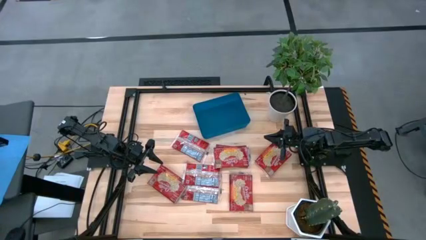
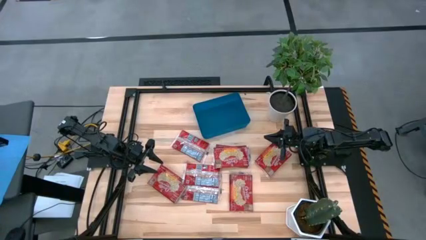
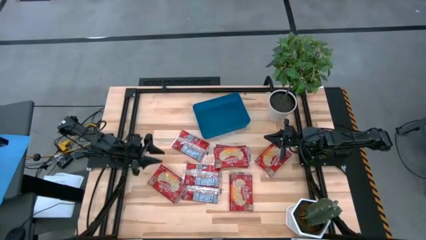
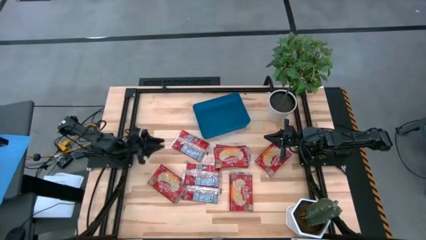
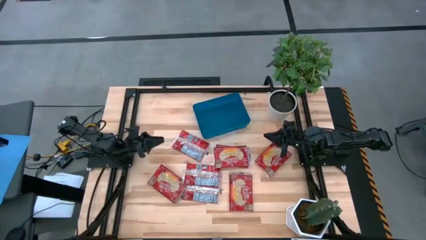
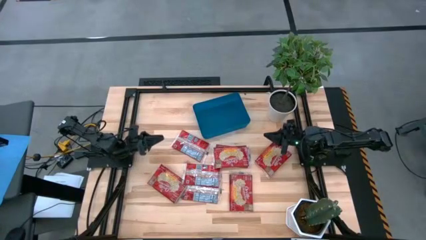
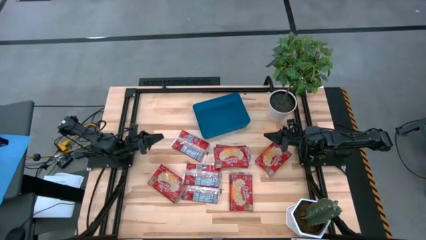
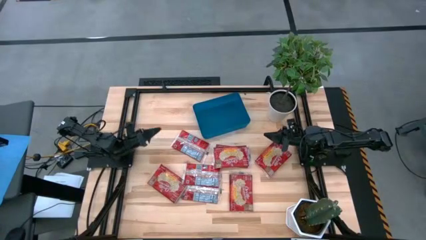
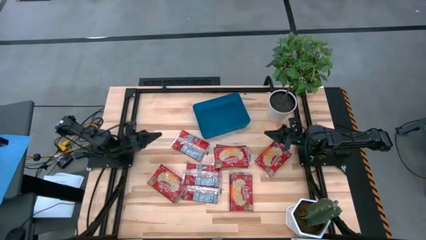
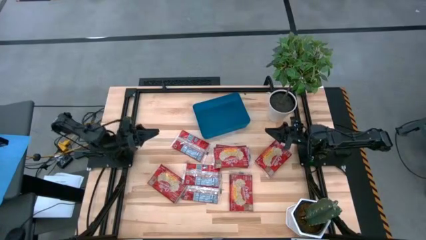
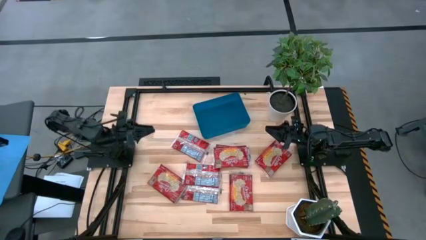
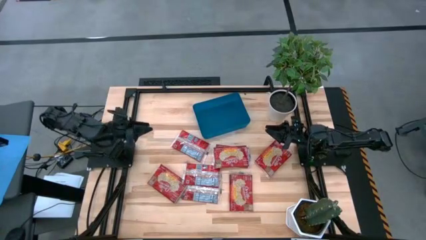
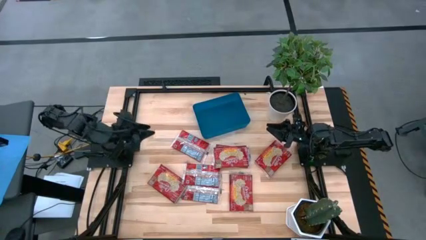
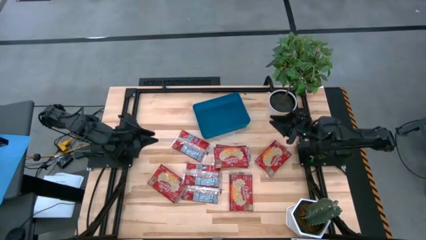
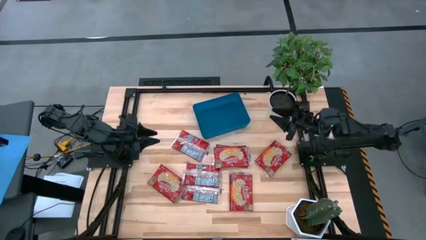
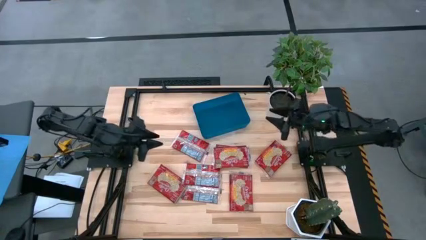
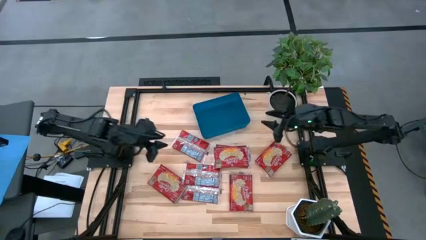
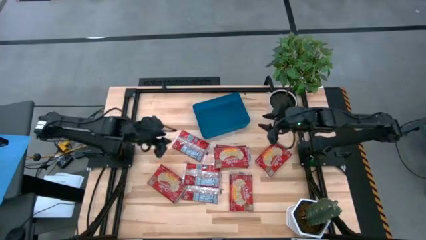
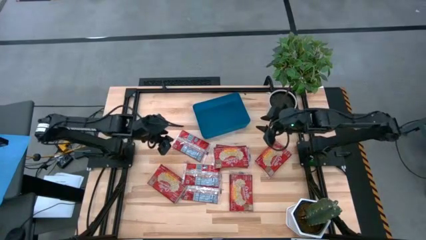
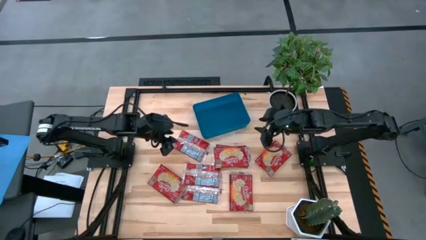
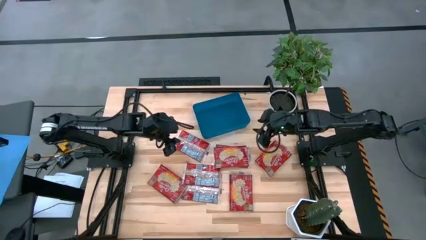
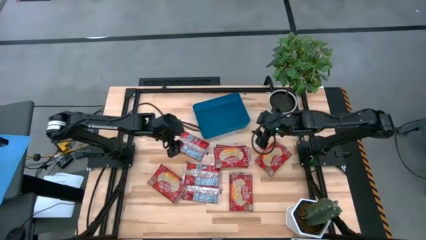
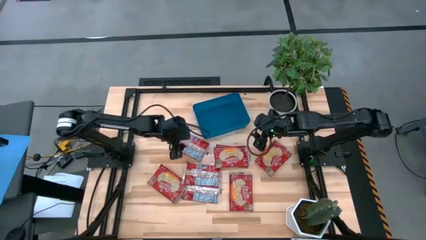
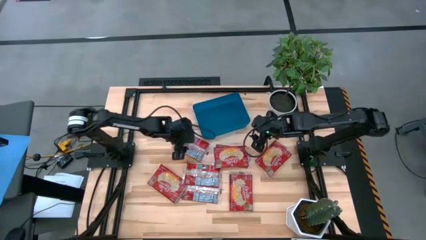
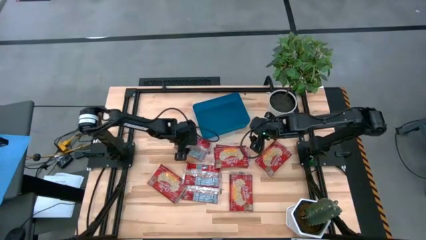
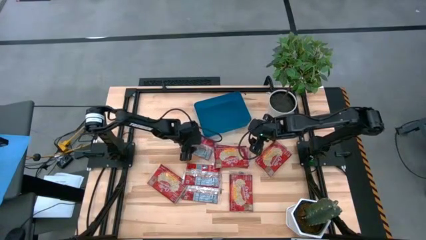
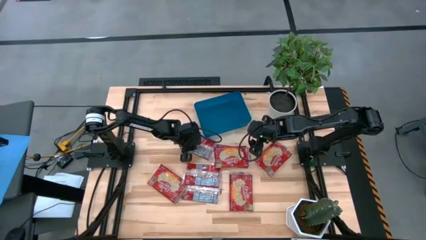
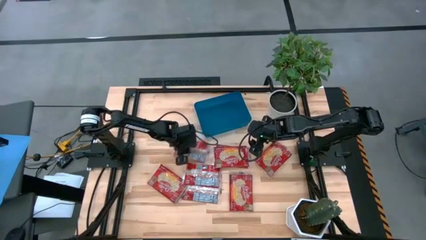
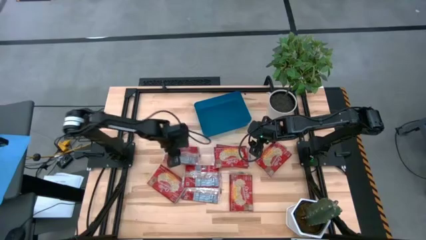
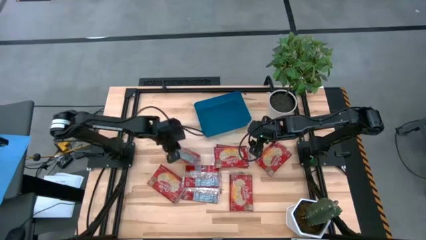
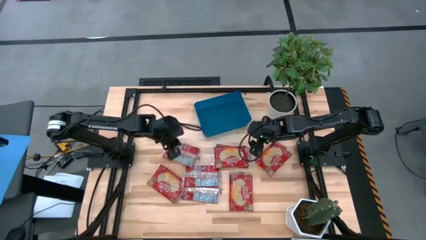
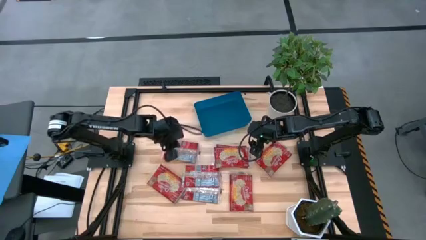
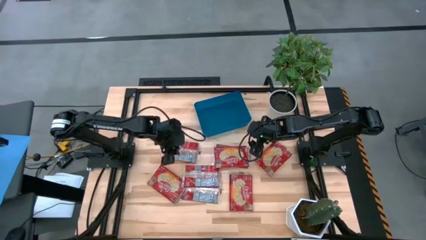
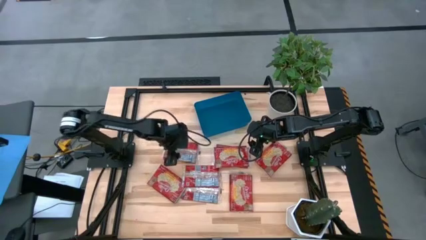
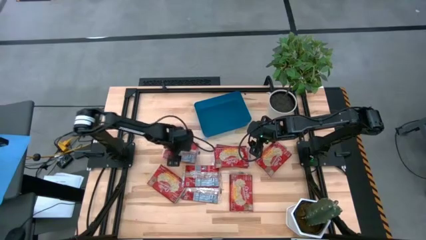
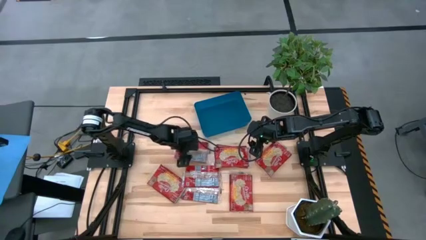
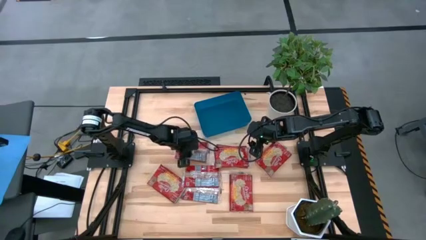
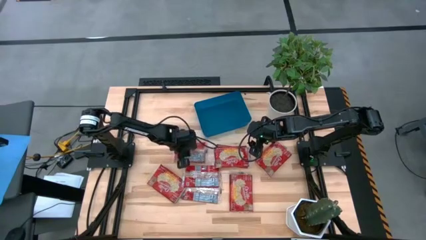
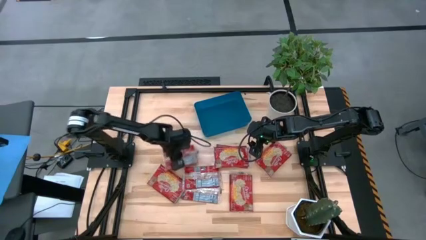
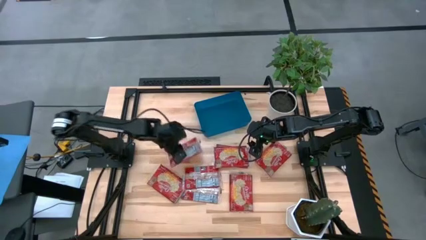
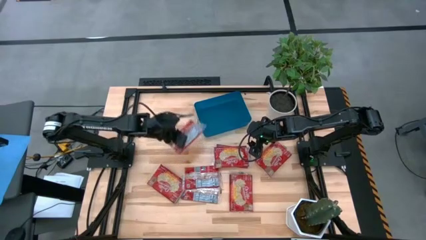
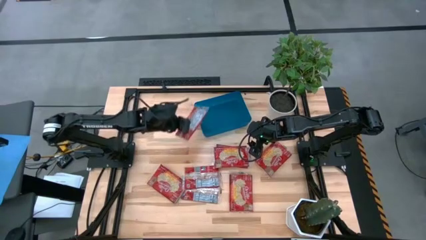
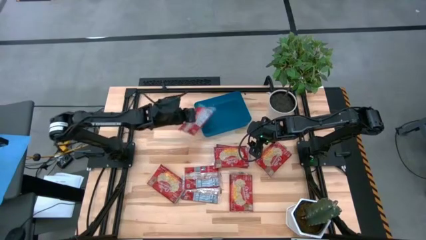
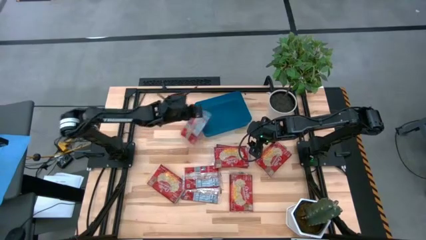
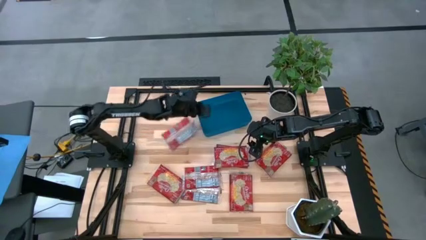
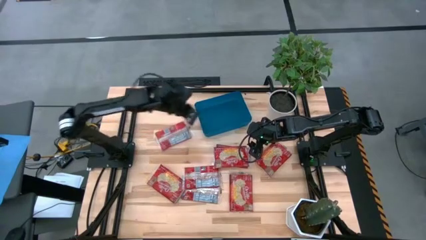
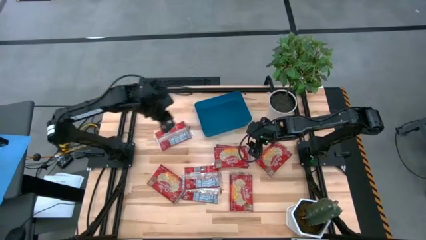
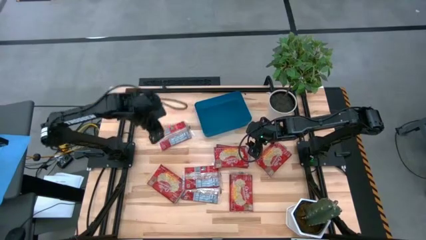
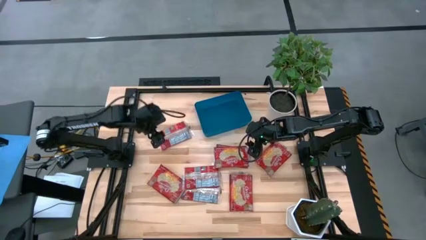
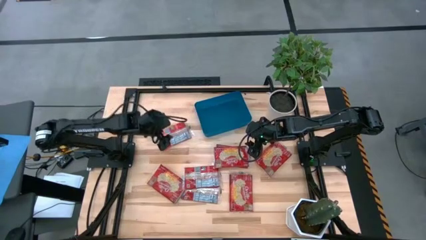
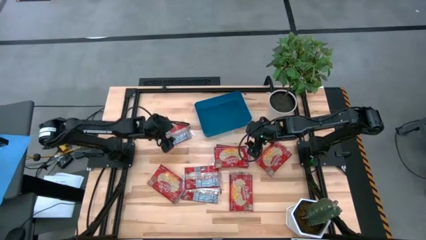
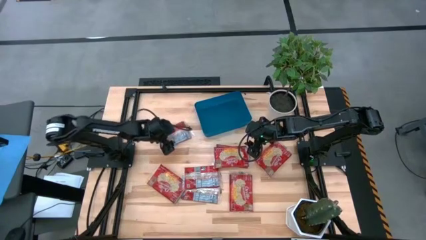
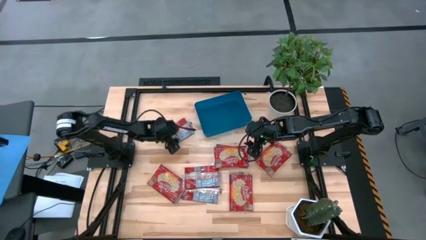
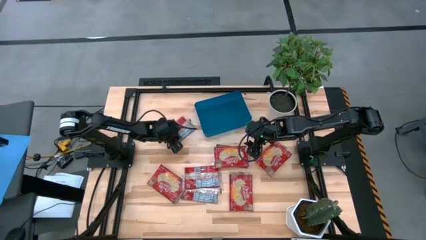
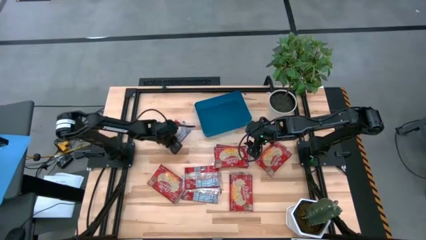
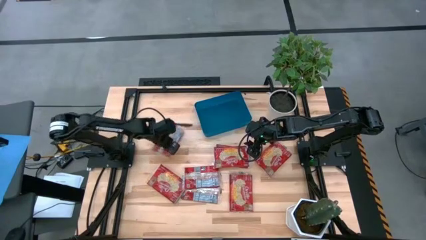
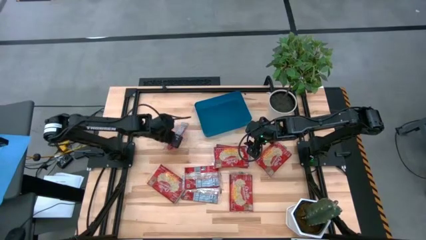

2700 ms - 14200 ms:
Task: Sort popcorn bags into baskets
Put the red popcorn bag into the blue bin

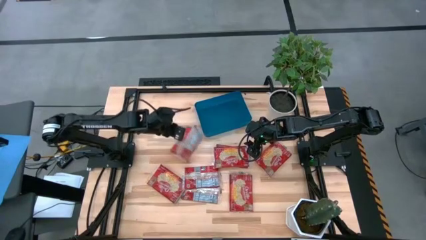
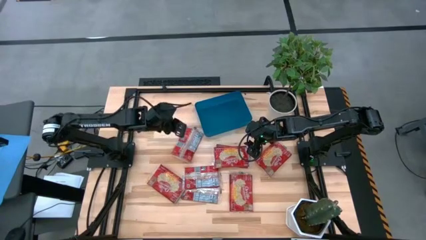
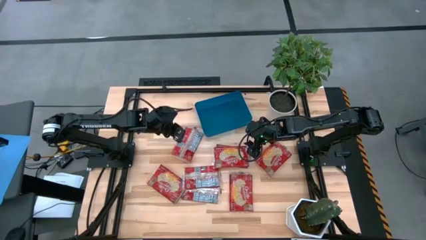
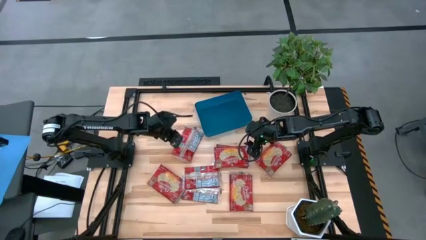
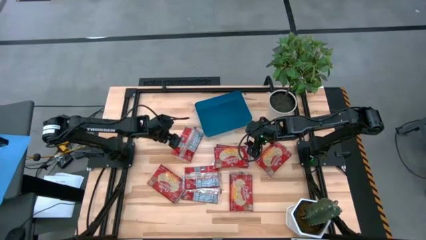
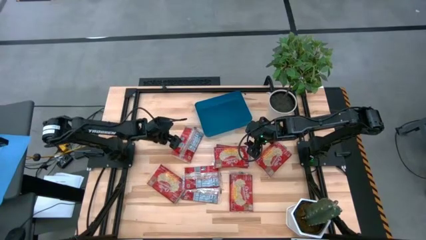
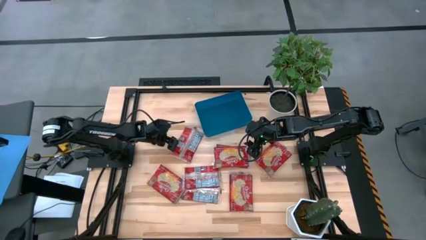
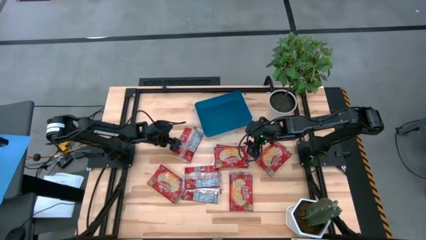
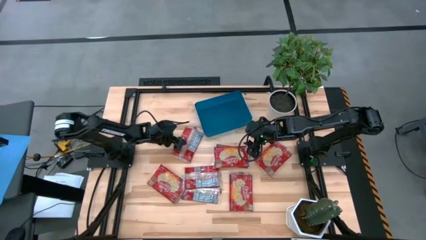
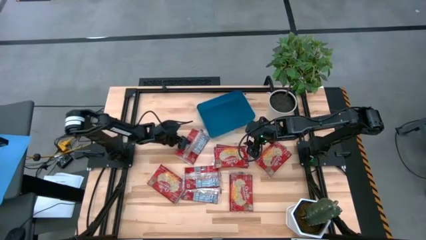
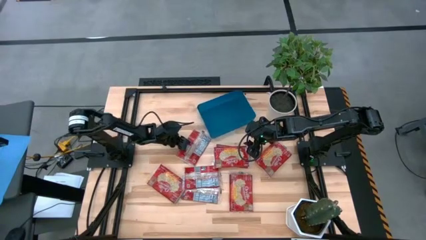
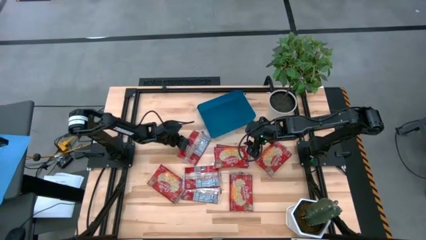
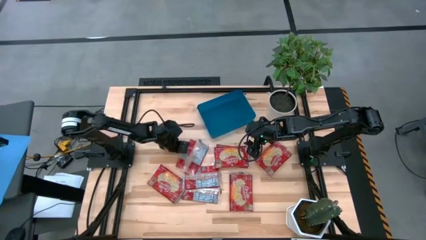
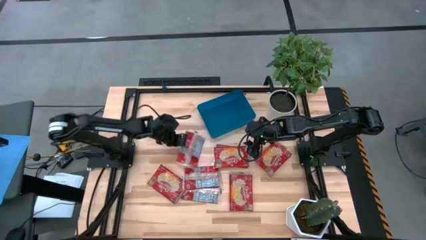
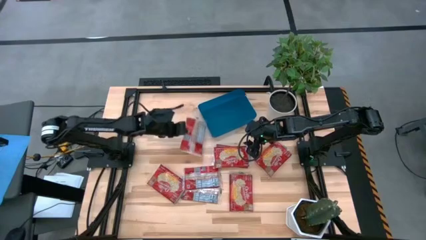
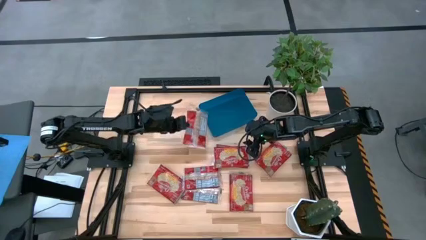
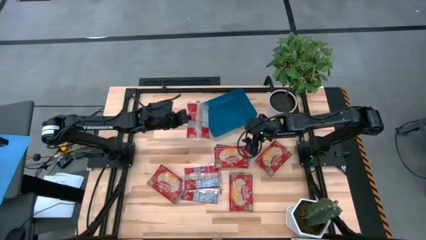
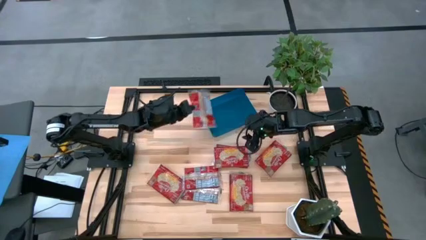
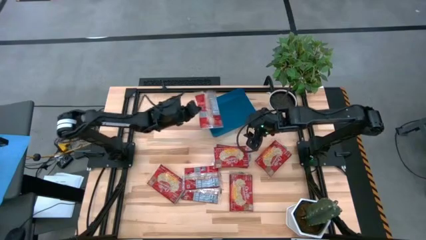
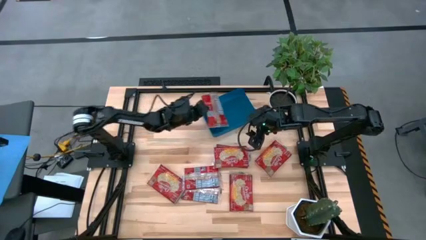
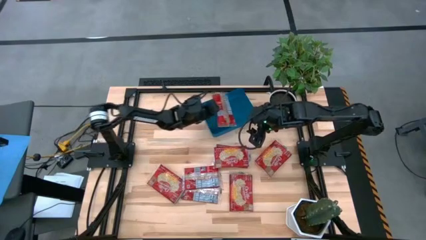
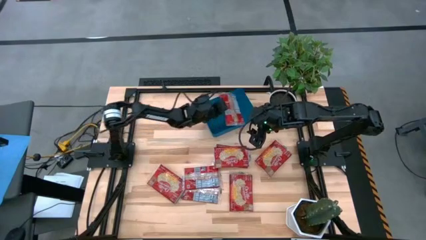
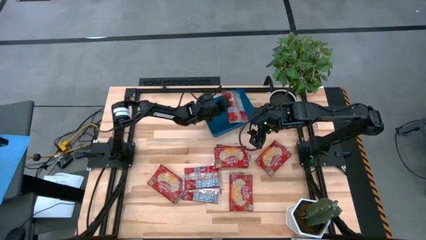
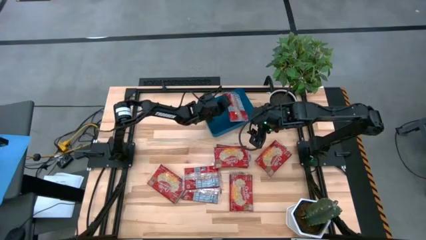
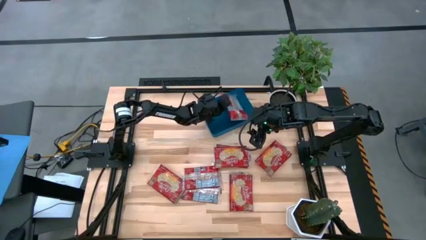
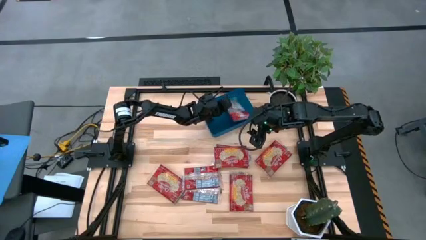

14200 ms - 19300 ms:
Put the red popcorn bag into the blue bin
